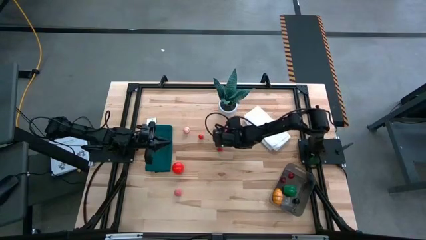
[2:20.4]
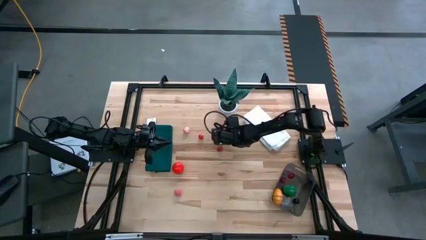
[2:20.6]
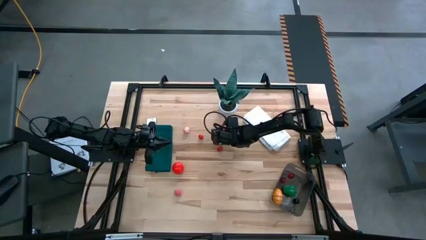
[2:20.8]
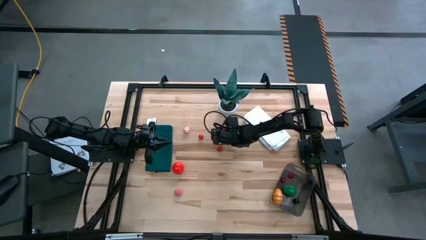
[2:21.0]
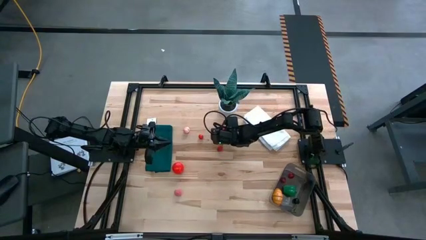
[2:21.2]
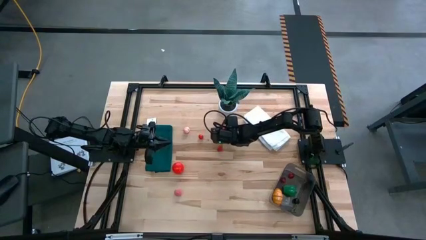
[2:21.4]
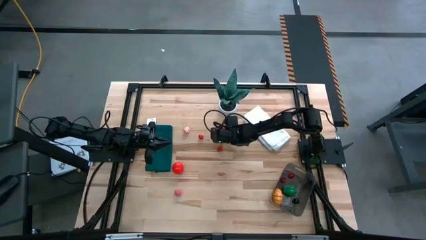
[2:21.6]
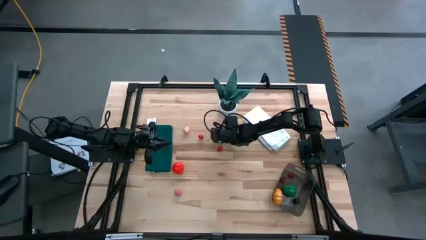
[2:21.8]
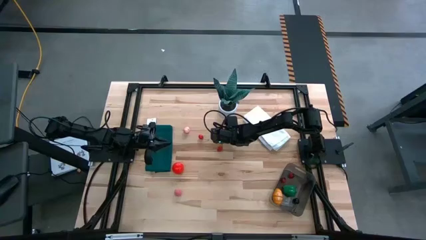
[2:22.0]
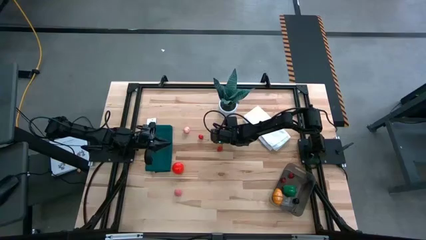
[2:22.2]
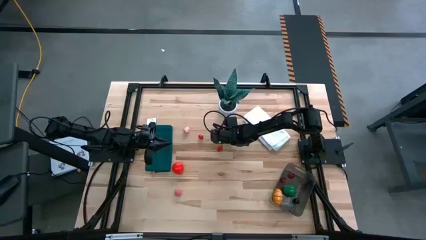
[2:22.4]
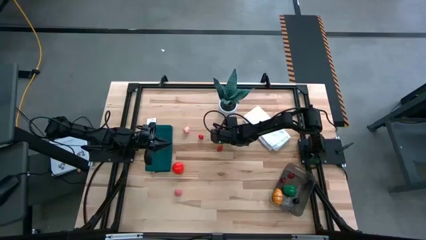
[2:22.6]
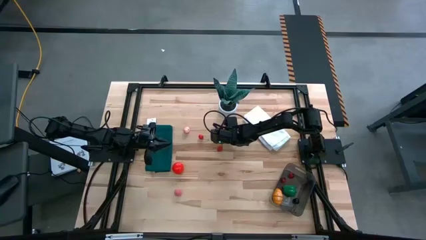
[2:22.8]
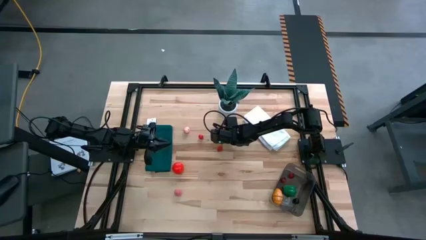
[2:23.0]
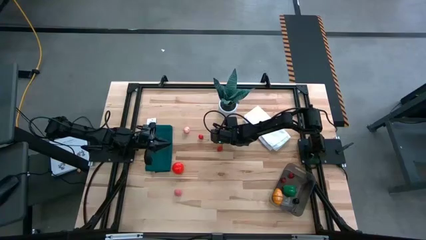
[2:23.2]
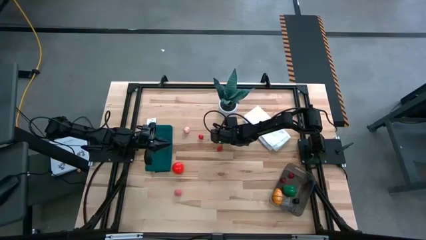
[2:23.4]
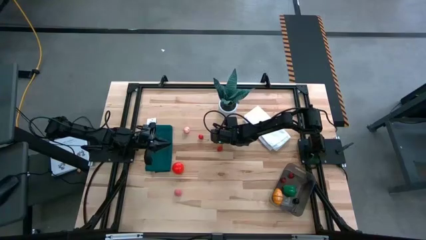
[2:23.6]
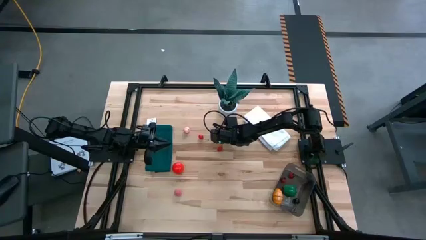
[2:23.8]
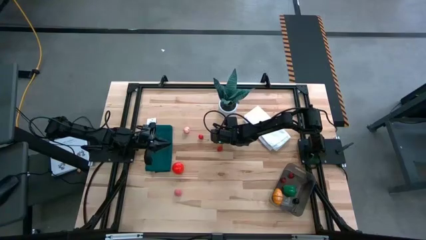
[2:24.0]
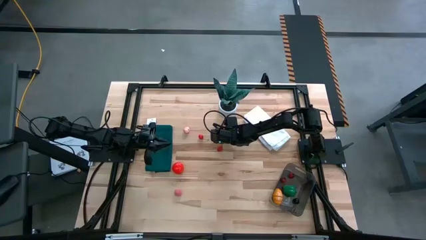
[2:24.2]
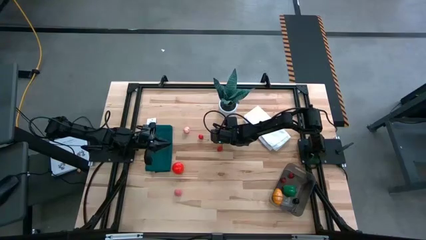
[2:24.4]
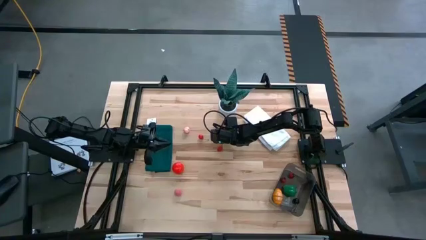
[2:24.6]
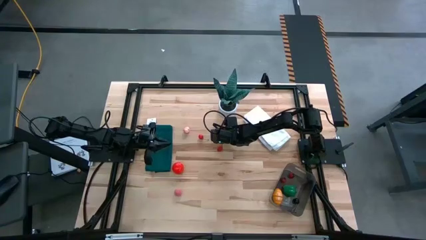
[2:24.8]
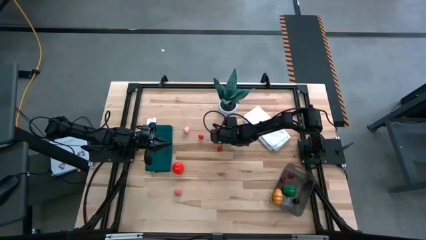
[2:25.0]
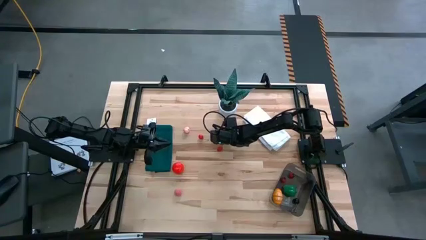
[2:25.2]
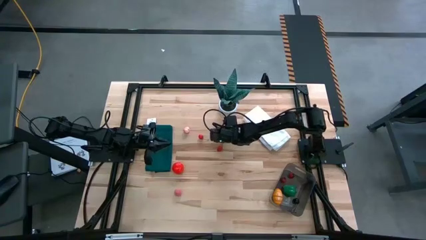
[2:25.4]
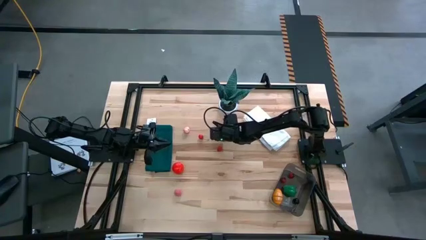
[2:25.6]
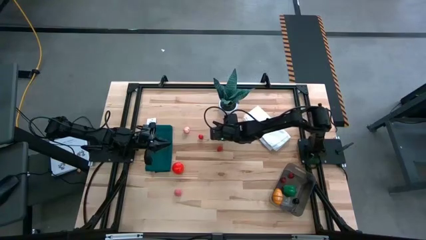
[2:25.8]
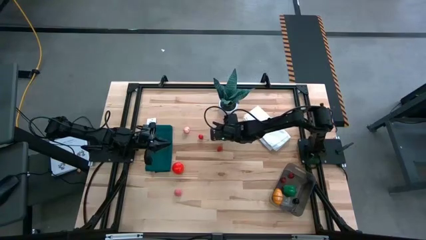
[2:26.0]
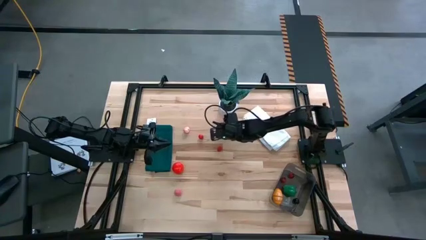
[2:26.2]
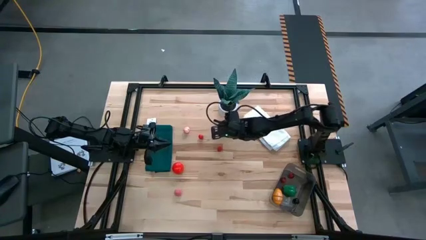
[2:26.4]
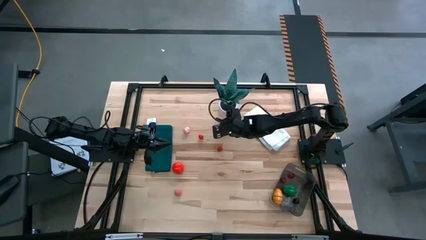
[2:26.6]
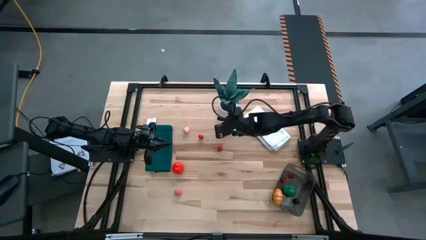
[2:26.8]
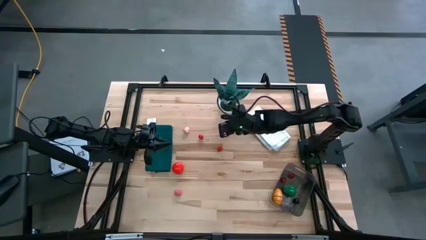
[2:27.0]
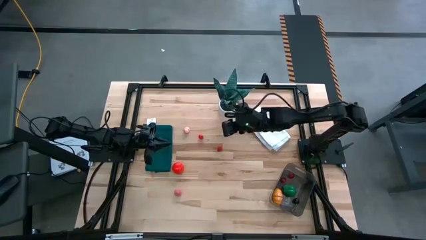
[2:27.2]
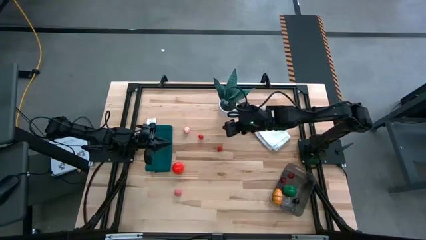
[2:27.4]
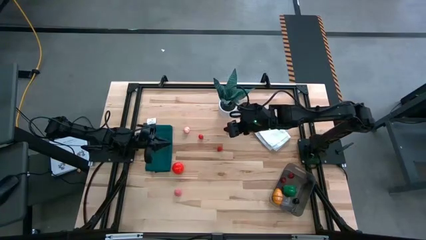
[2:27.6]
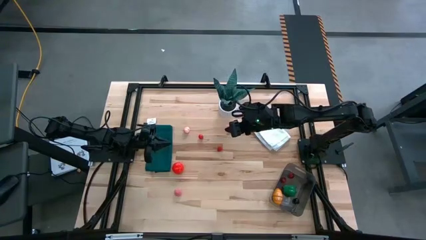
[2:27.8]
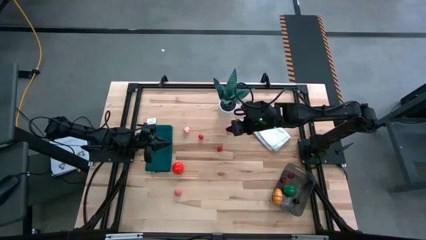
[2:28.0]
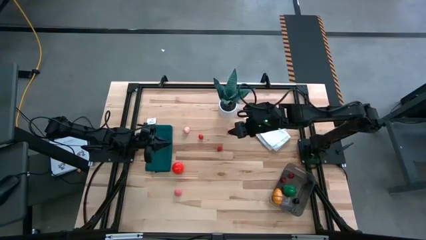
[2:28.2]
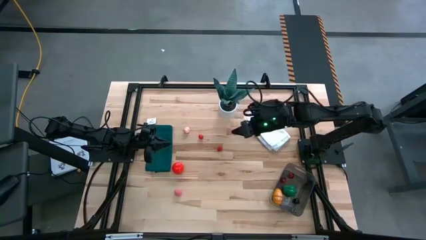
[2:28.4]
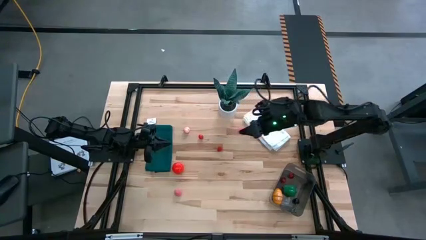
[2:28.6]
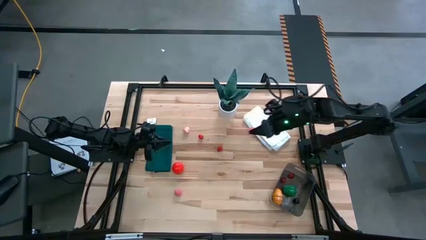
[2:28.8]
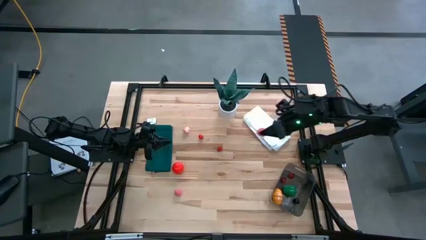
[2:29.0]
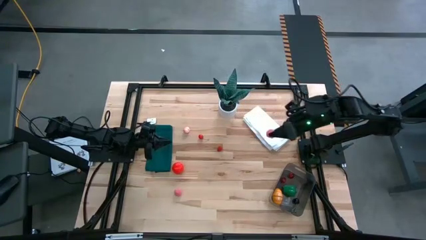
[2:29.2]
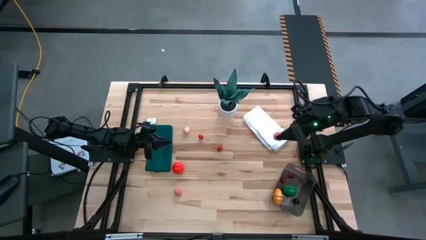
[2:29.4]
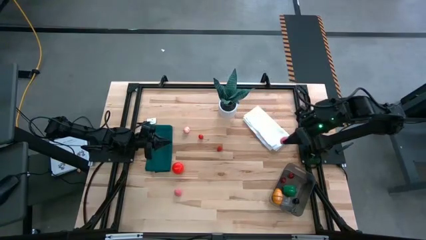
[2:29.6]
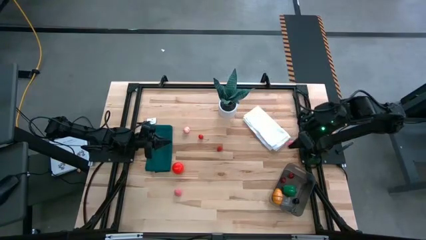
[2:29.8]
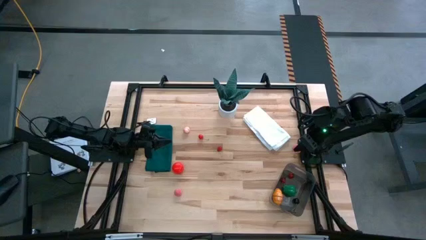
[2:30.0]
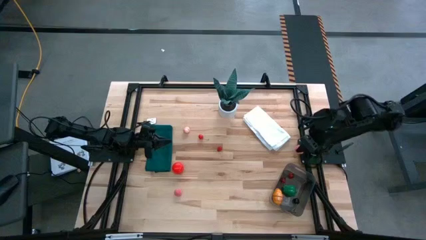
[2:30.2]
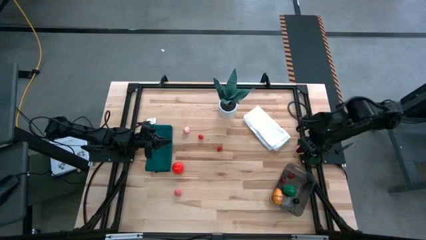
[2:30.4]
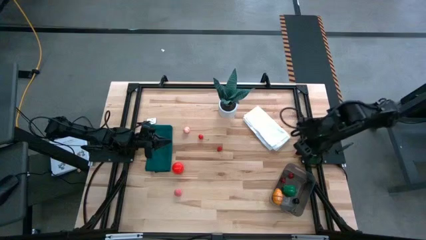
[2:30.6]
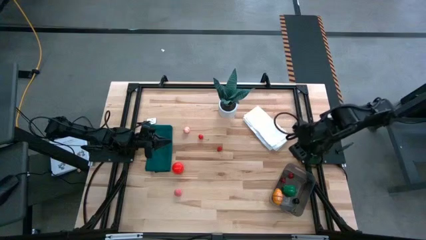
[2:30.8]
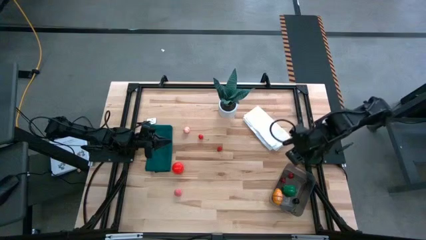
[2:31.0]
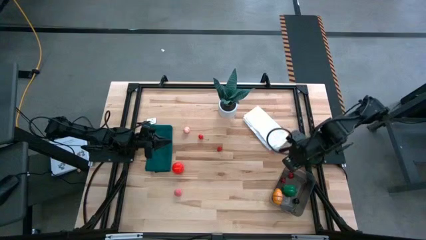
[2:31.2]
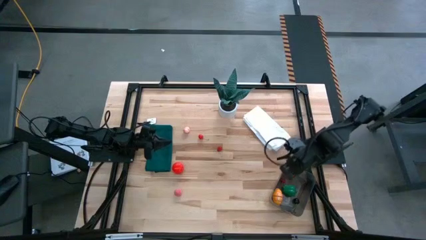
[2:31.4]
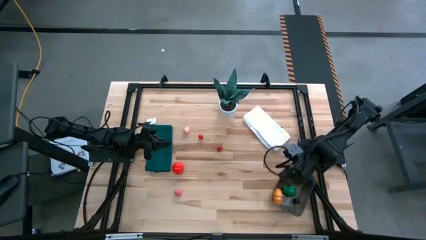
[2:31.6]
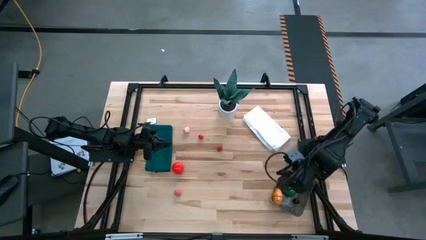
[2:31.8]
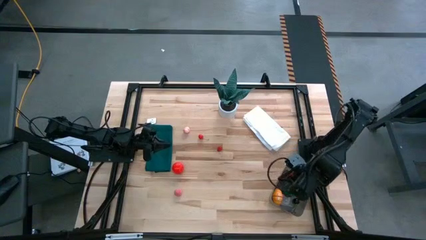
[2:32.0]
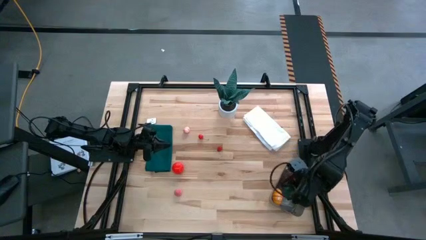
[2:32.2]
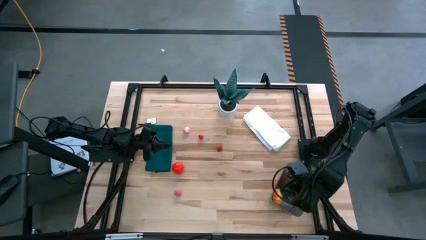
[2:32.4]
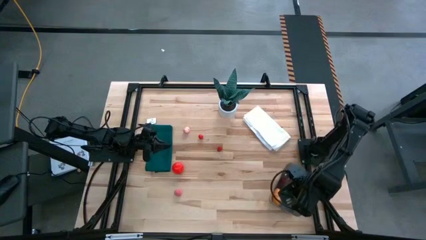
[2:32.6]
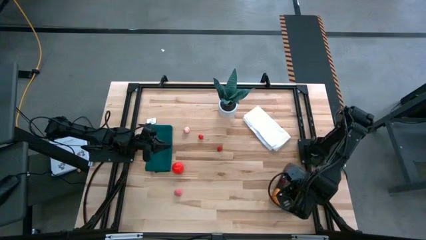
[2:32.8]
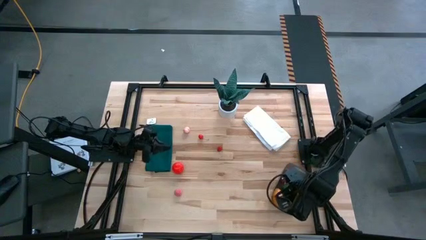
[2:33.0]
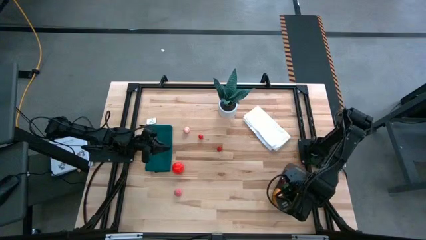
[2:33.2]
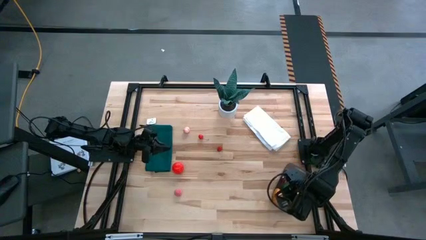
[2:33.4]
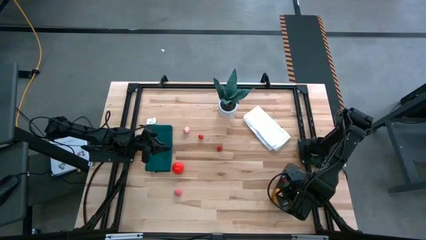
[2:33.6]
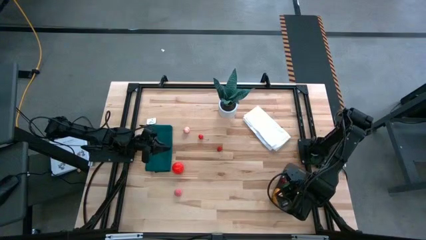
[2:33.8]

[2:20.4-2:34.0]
Task: Pick and placing Produce into tupperware
Put the top right pink peach into the black bin

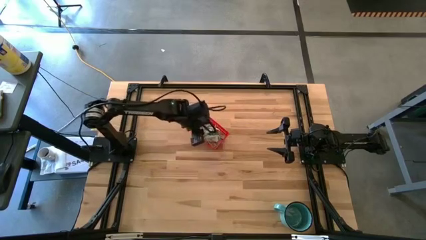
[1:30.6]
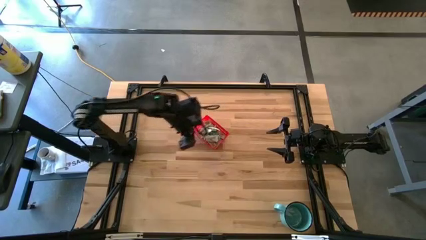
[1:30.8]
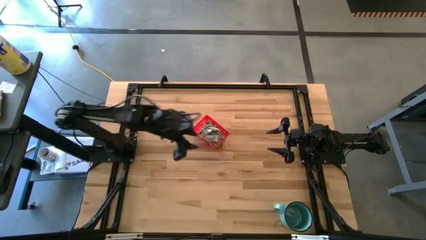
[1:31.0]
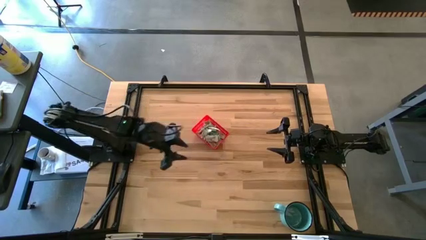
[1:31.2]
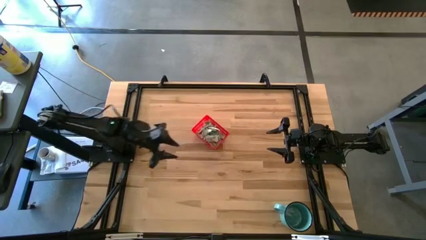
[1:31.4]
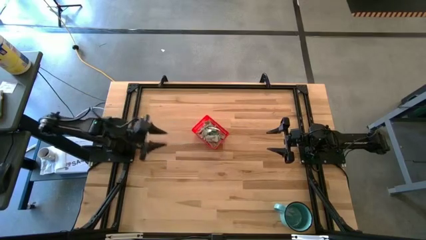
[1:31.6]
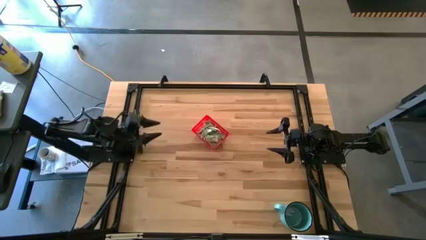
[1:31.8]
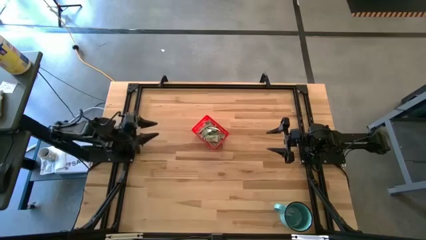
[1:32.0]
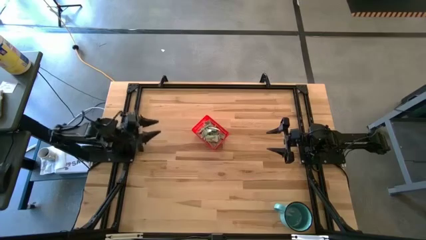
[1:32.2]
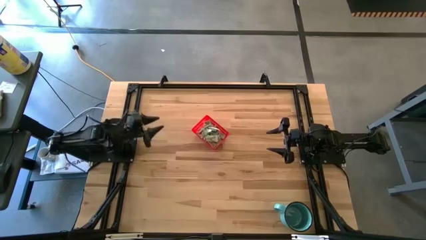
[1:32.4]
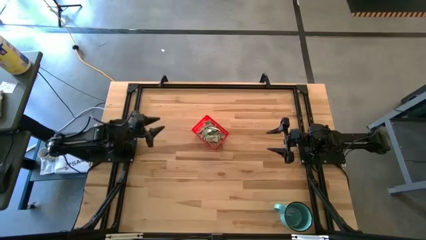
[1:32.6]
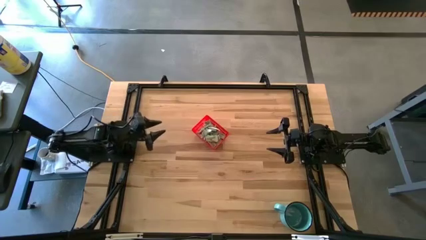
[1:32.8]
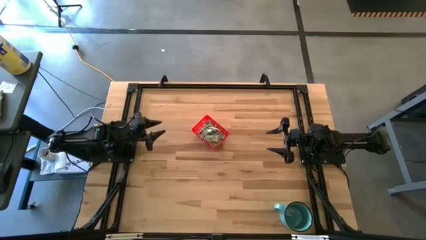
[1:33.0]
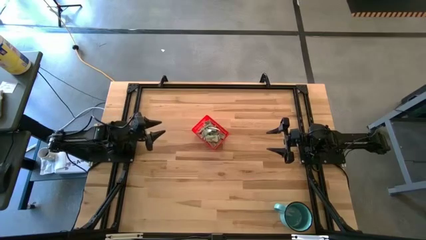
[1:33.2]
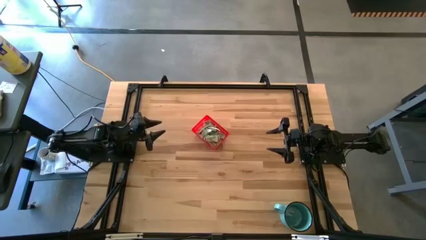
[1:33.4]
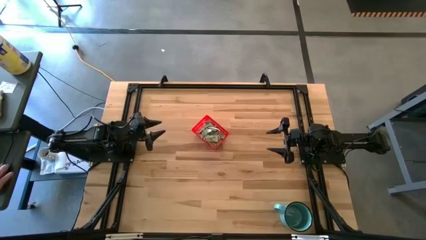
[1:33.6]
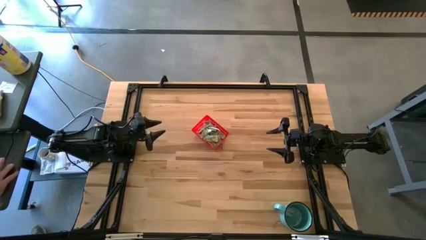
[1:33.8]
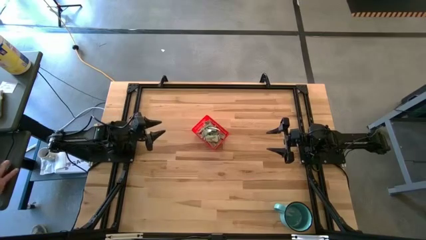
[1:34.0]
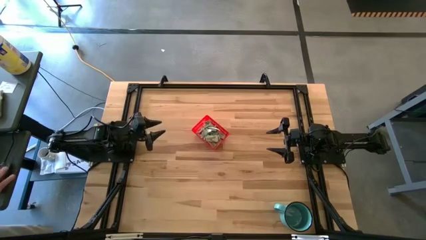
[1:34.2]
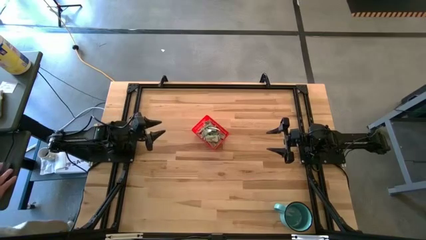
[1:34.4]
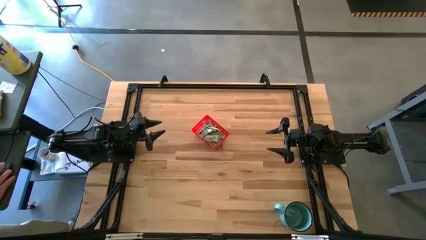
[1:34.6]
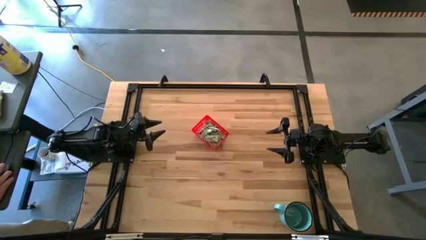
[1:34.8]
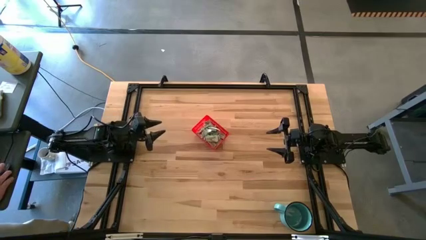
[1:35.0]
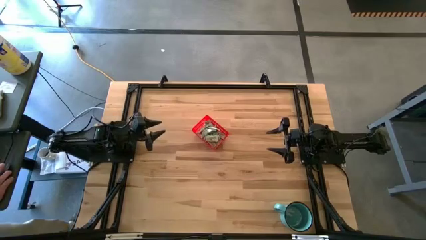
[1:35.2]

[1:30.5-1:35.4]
Task: Pick and place Stevia / Truvia into bins
Return to Home Position
